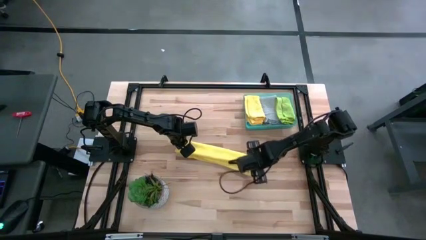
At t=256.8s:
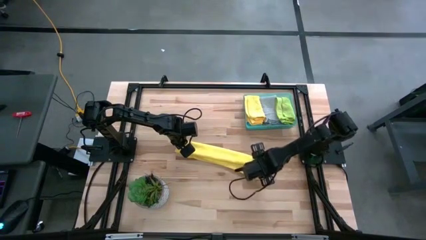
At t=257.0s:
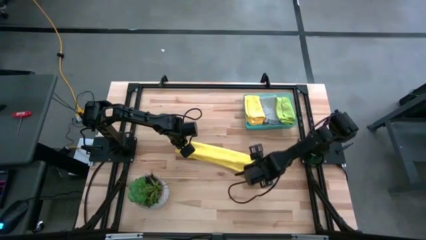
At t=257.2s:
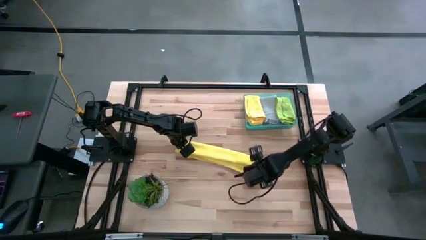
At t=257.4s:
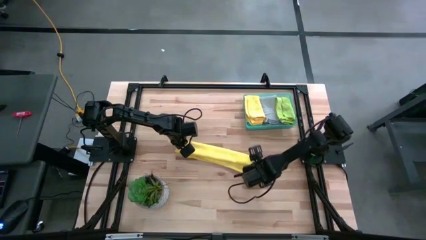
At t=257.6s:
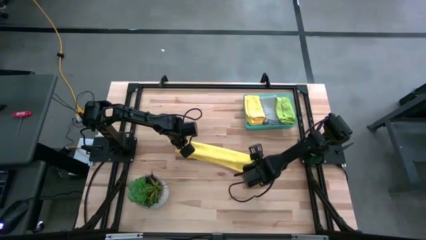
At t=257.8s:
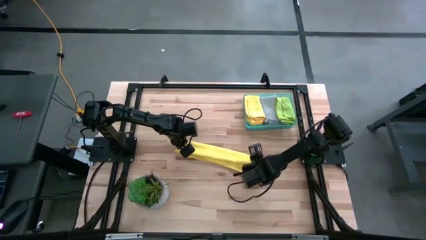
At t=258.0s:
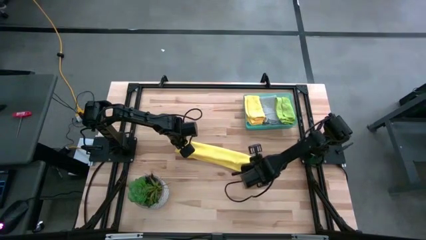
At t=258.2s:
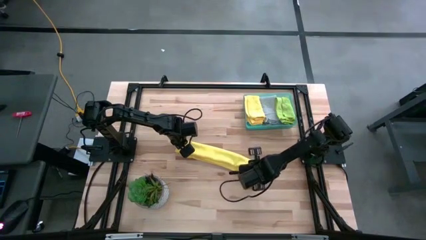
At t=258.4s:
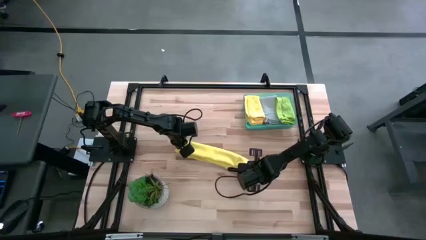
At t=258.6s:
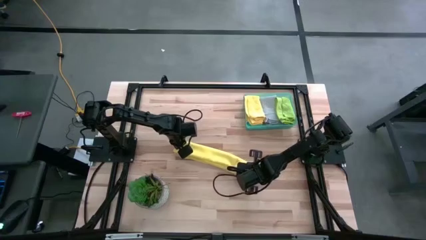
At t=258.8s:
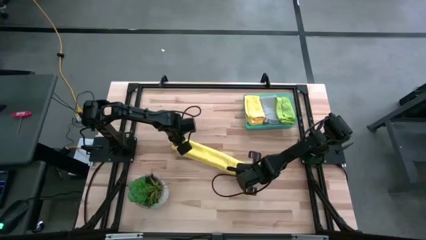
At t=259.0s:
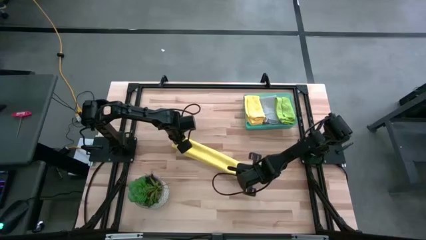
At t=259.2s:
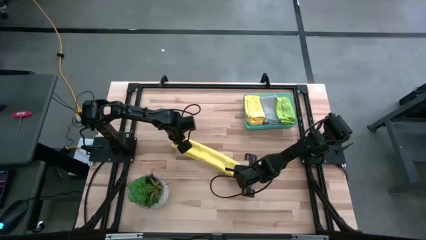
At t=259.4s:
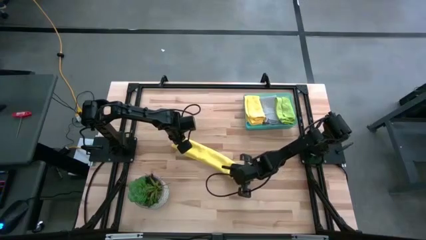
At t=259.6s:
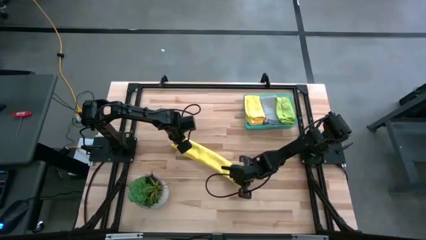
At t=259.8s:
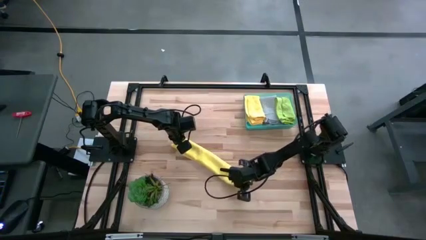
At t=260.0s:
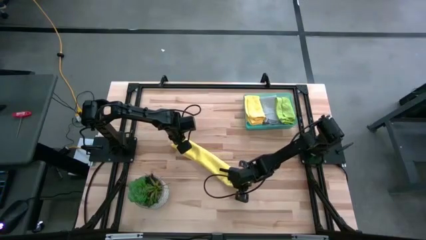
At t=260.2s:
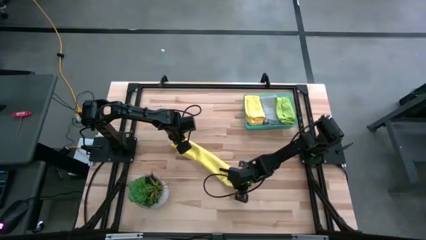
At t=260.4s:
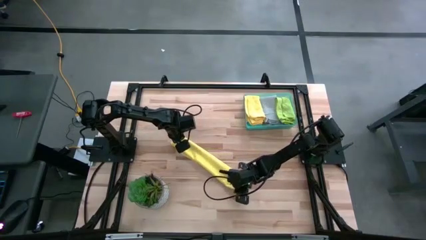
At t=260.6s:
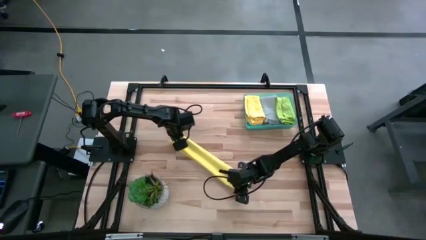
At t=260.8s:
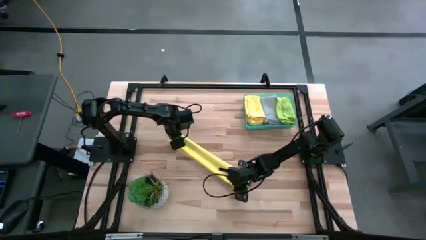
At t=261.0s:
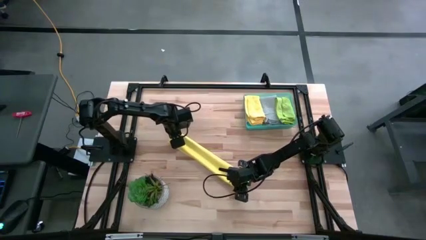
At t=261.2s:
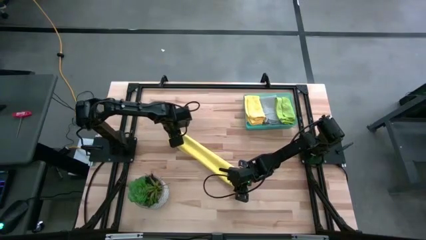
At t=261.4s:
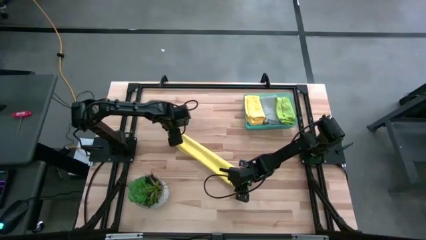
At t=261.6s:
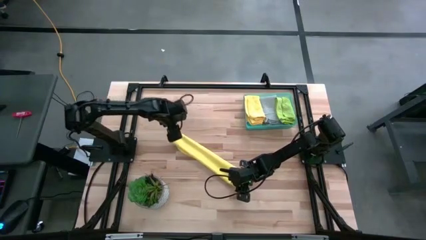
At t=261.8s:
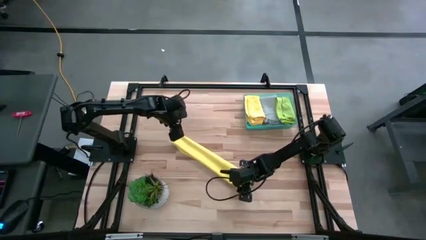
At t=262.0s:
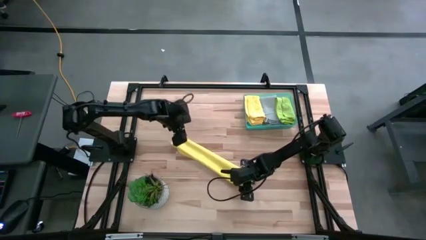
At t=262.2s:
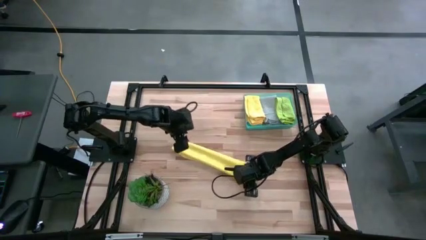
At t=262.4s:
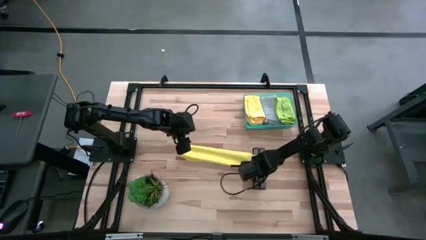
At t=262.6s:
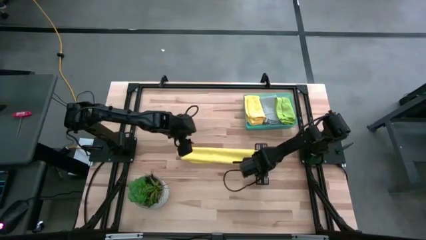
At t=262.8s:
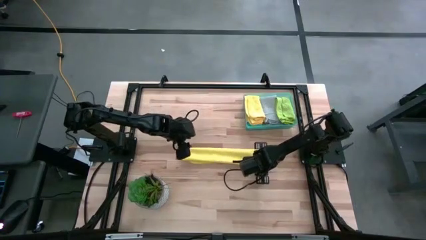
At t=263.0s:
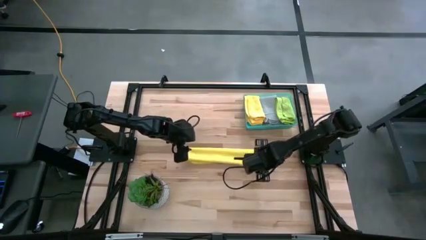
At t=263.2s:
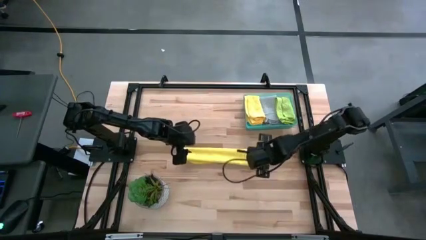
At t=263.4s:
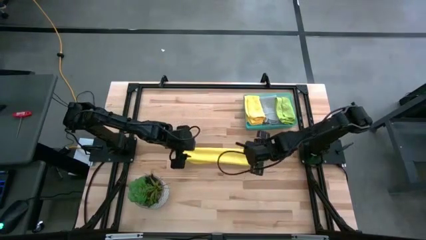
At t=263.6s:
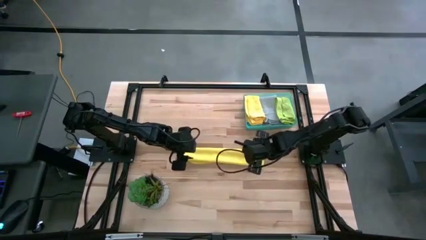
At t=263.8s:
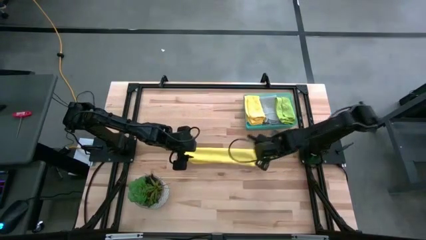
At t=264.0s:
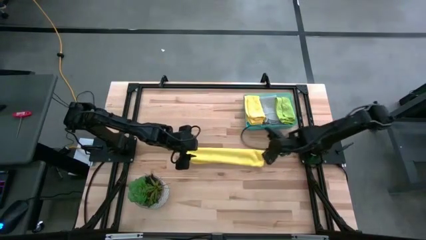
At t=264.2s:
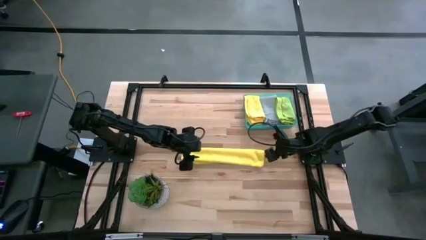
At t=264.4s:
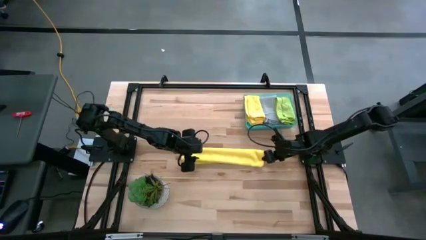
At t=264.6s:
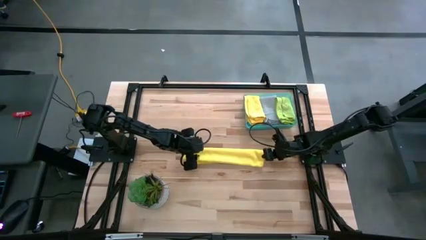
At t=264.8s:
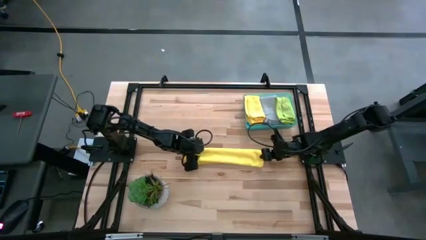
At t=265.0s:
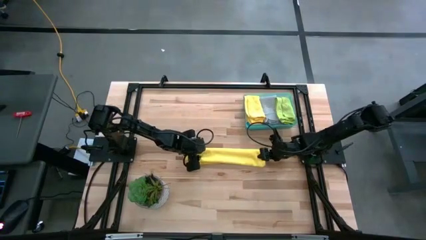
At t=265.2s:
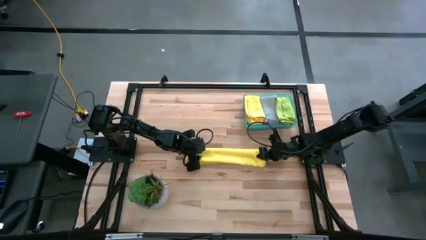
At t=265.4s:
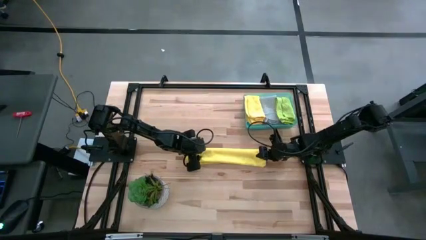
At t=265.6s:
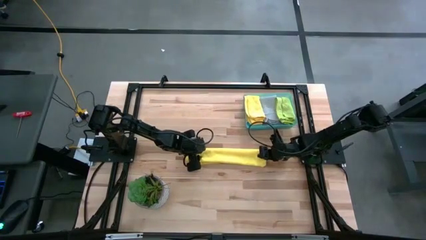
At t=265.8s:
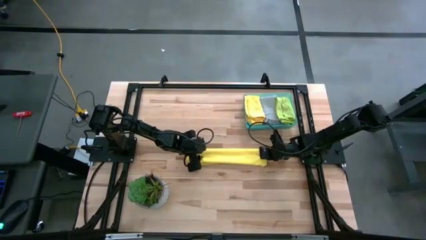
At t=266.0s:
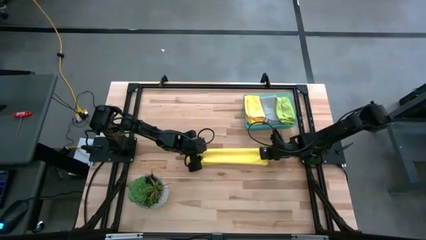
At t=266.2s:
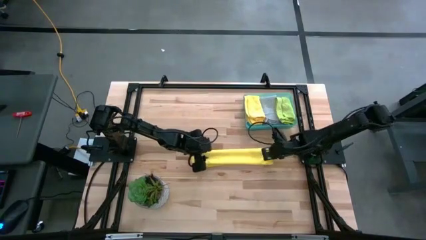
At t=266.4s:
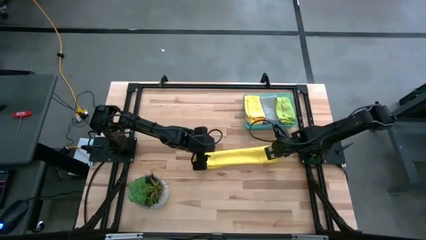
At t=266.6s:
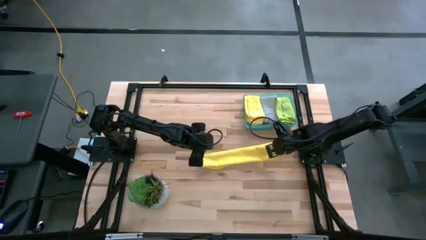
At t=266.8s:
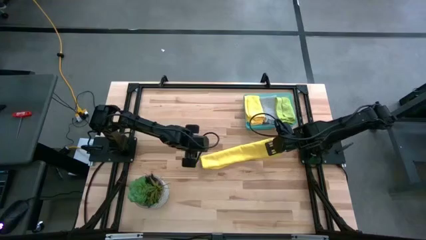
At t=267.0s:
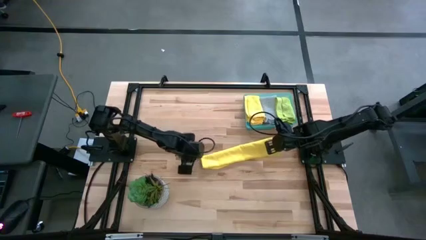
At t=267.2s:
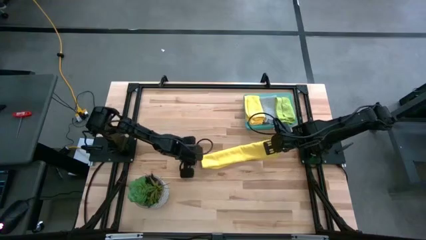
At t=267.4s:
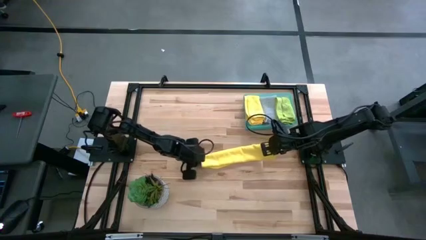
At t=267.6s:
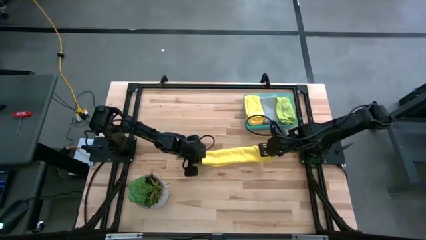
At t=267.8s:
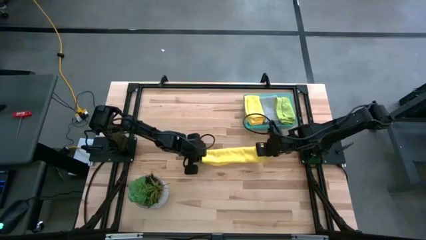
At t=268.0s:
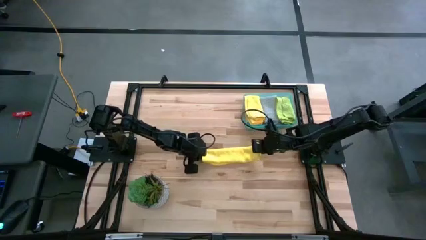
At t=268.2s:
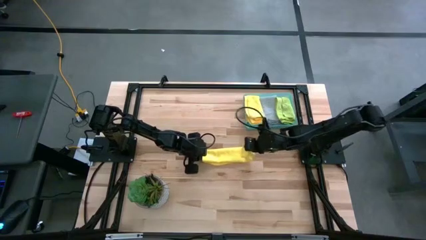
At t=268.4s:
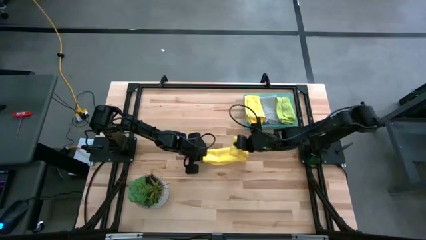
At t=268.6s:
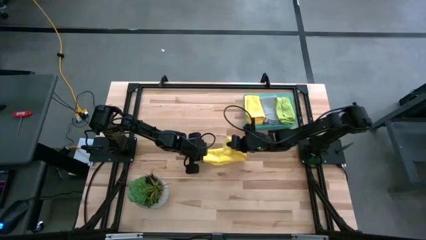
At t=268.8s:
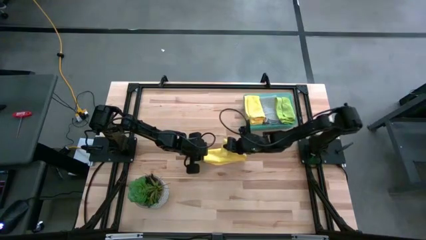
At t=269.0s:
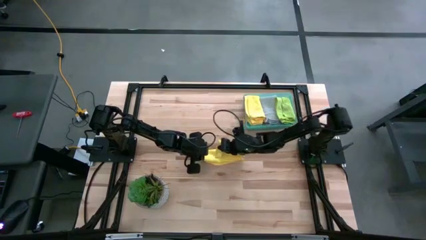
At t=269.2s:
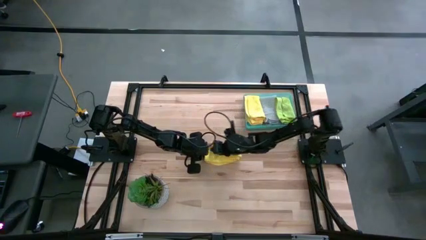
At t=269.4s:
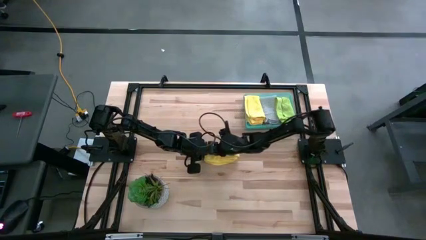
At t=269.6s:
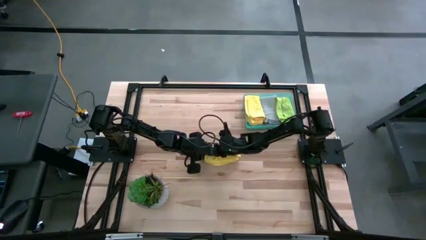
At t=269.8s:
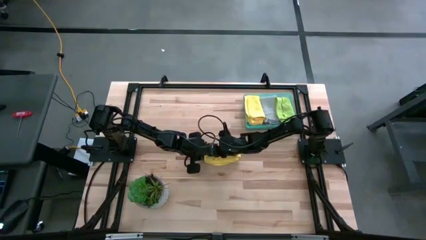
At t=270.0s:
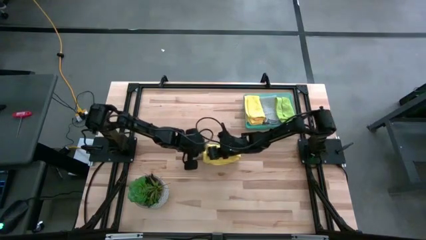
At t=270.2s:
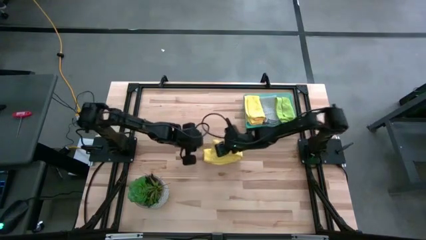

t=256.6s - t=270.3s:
Task: Fold microfiber towels
Fold the yellow towel

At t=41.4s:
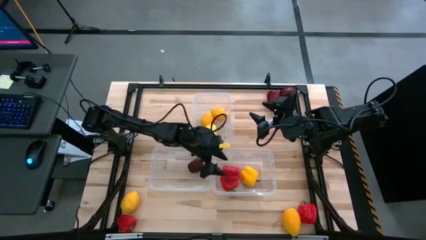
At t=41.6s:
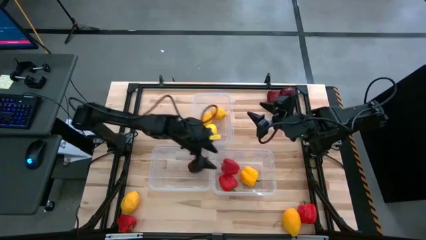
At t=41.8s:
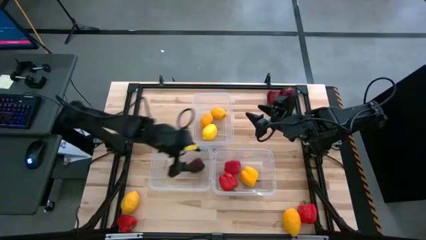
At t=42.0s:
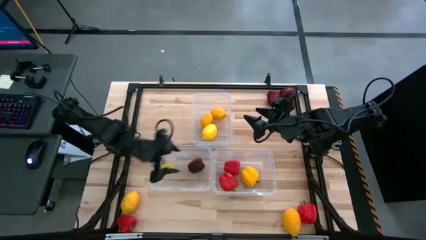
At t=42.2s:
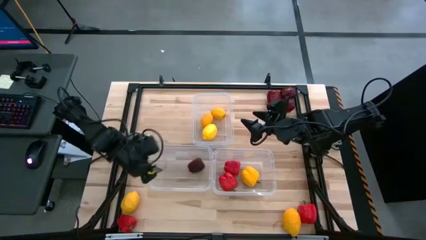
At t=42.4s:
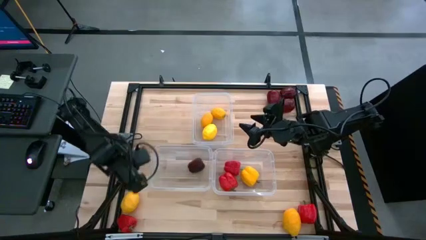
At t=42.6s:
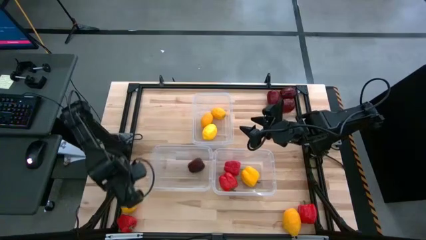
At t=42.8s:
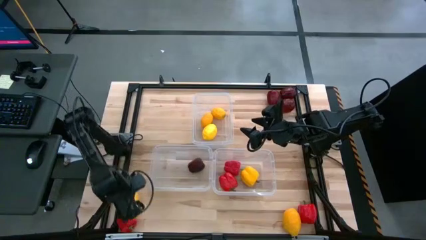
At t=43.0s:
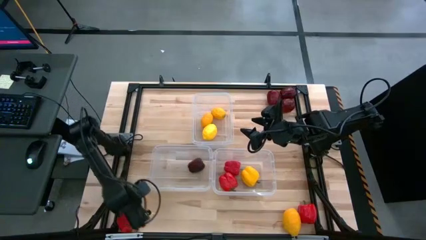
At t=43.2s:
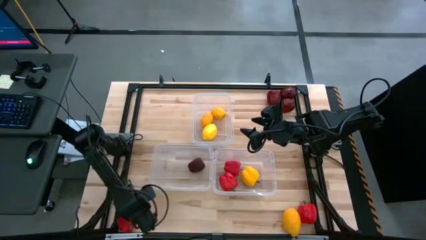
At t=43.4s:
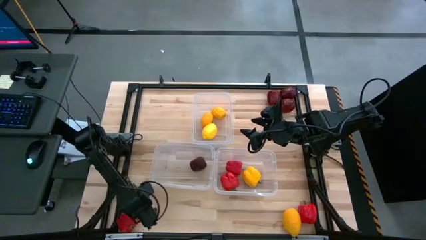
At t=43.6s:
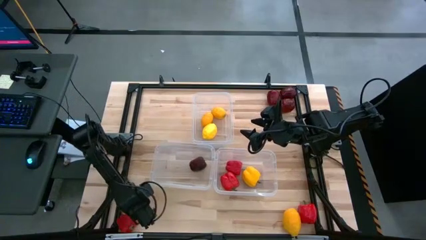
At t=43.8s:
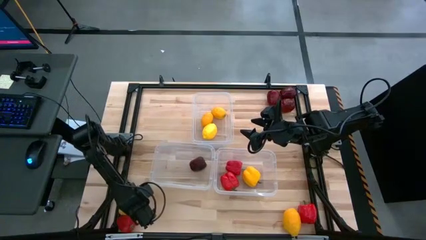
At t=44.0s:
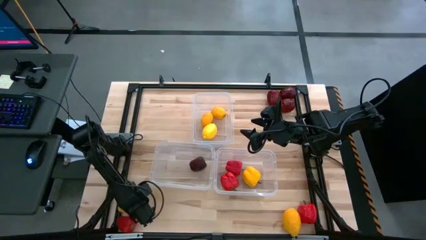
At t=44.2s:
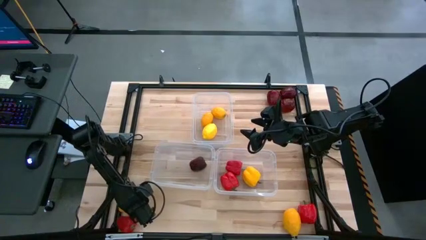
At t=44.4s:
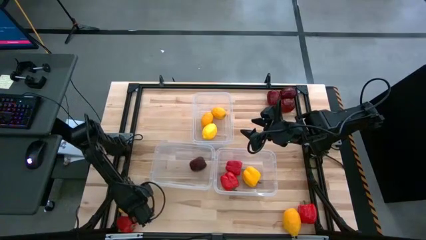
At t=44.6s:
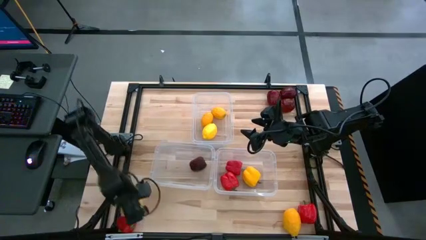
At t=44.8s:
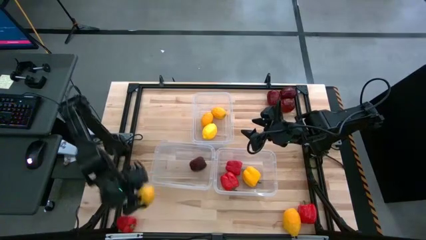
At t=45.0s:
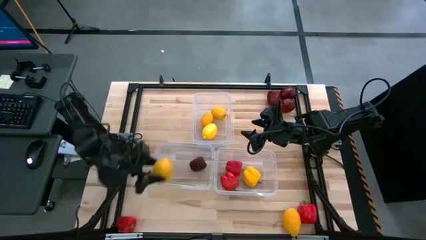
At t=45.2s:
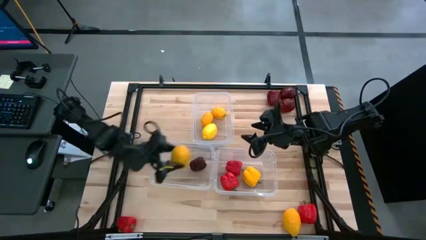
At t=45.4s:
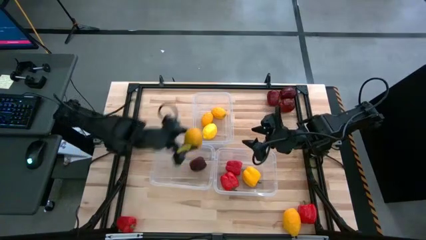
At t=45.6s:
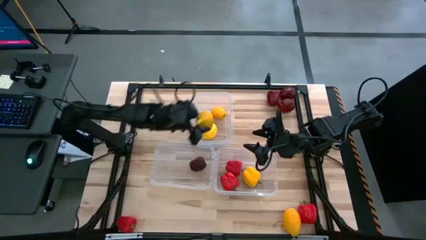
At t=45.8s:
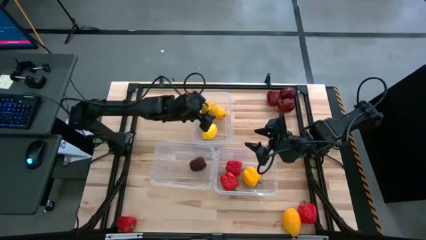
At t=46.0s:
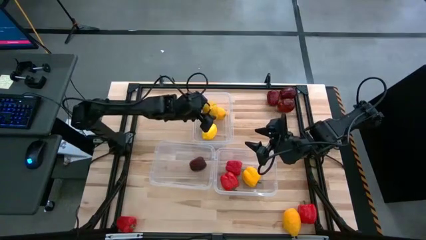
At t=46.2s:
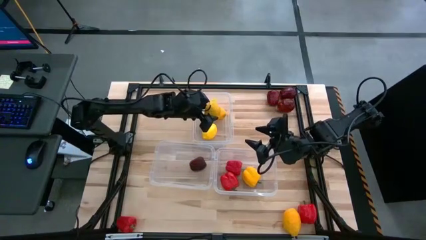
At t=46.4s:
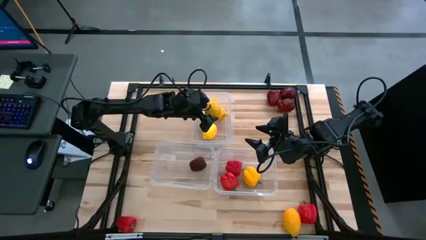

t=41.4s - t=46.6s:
Task: Sort produce into baskets
Put the yellow lemon into the top center transparent bin
